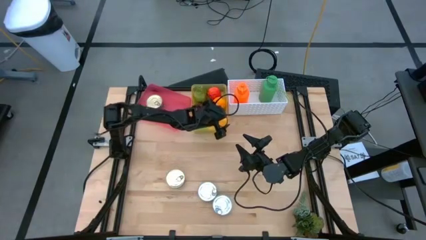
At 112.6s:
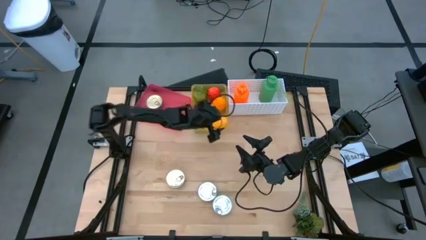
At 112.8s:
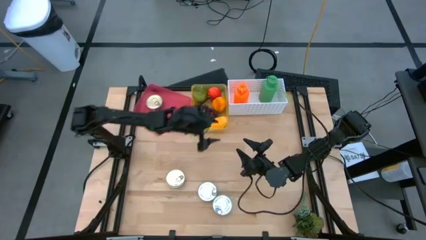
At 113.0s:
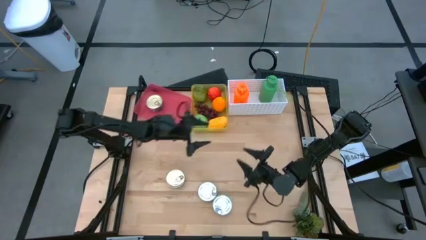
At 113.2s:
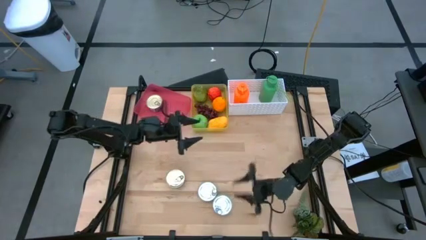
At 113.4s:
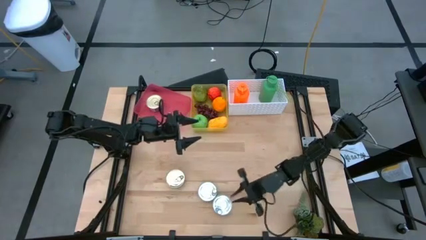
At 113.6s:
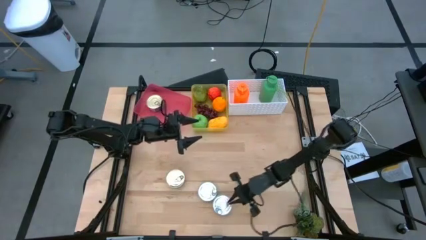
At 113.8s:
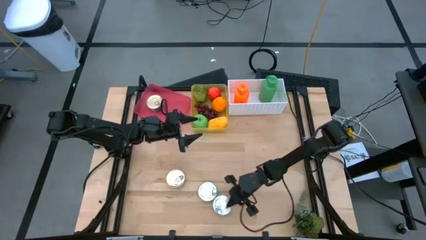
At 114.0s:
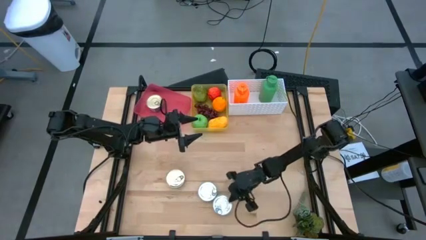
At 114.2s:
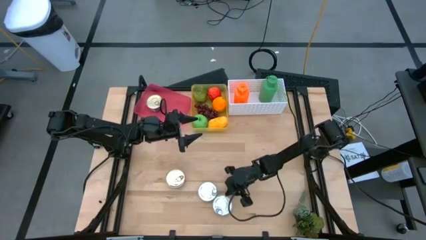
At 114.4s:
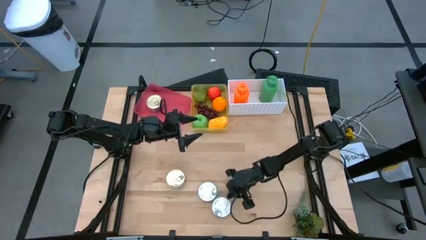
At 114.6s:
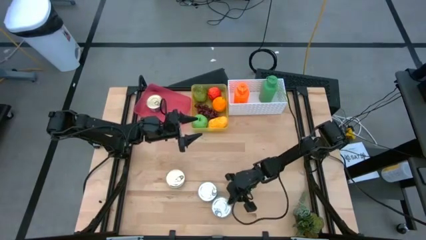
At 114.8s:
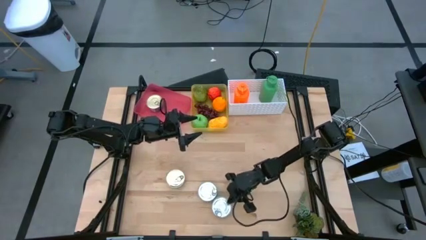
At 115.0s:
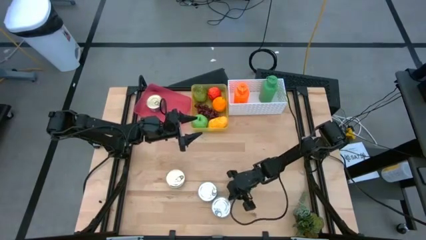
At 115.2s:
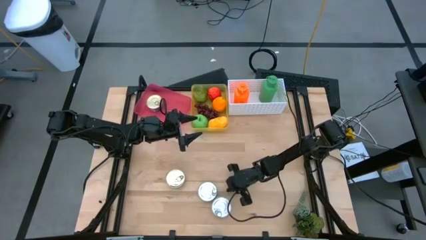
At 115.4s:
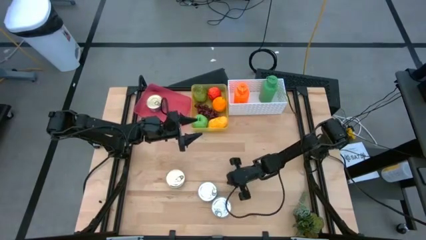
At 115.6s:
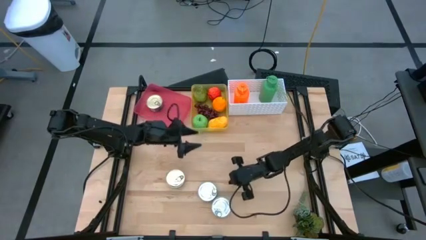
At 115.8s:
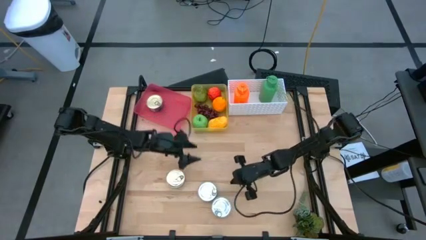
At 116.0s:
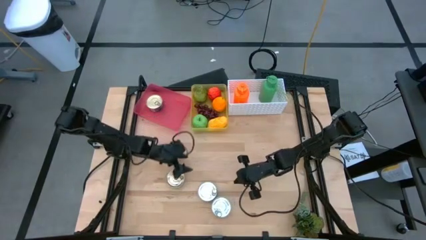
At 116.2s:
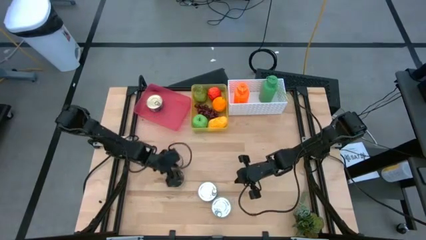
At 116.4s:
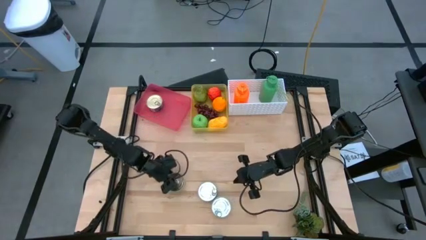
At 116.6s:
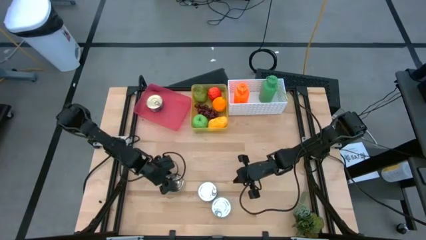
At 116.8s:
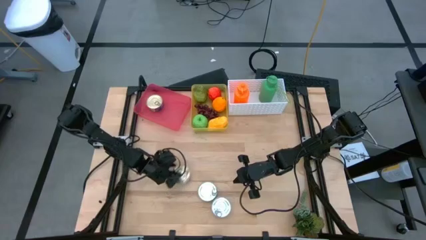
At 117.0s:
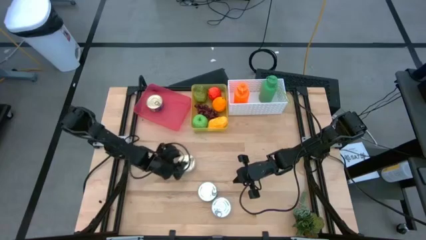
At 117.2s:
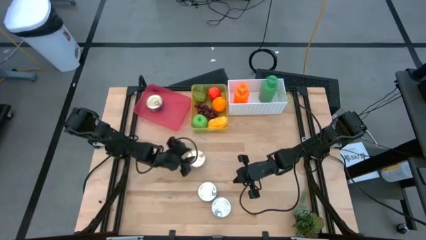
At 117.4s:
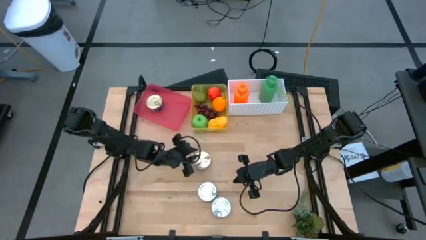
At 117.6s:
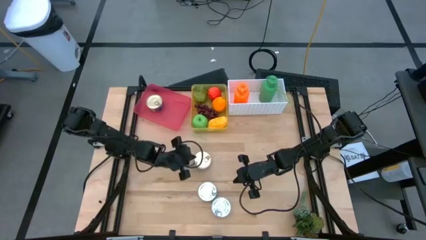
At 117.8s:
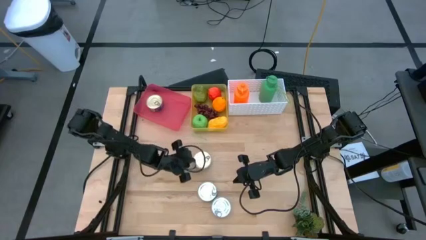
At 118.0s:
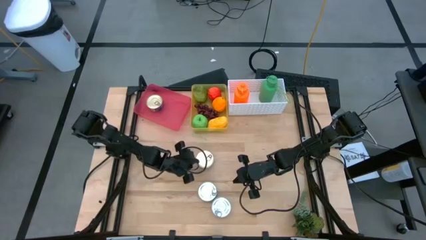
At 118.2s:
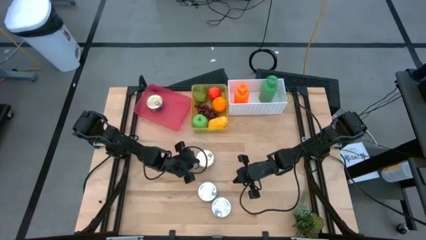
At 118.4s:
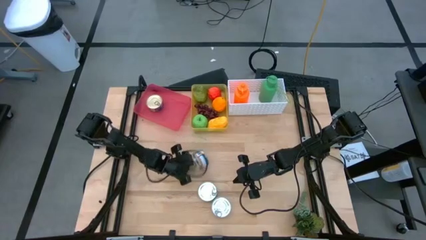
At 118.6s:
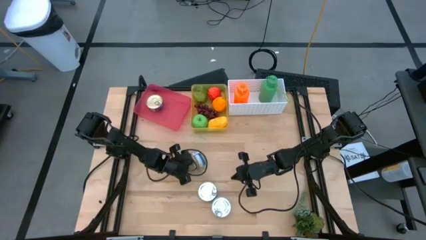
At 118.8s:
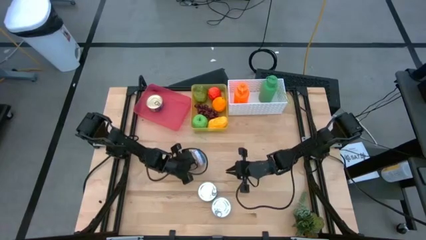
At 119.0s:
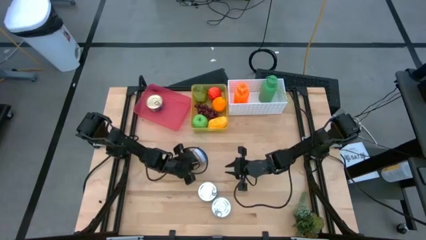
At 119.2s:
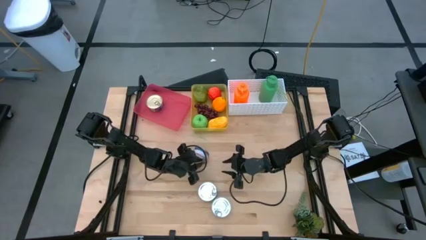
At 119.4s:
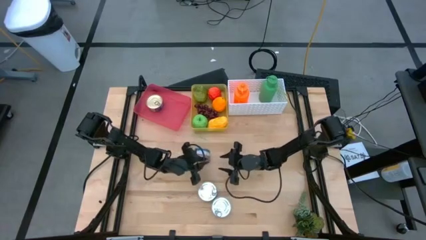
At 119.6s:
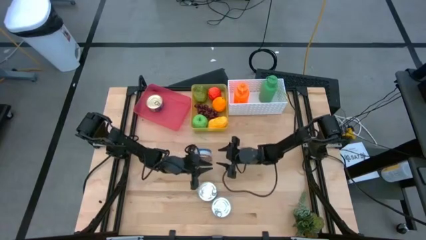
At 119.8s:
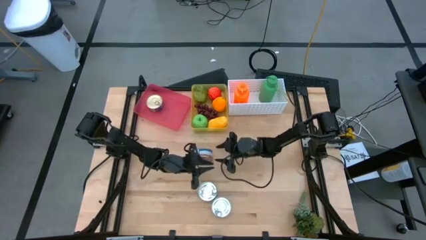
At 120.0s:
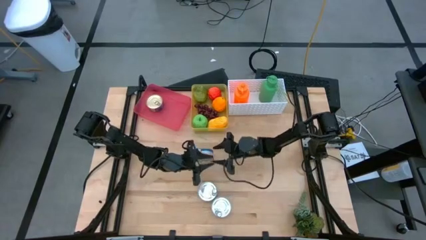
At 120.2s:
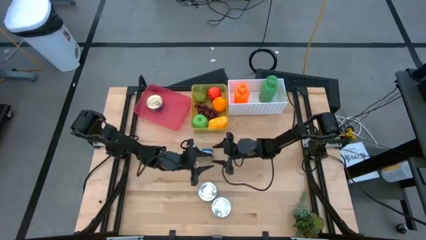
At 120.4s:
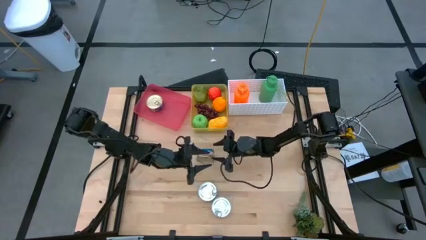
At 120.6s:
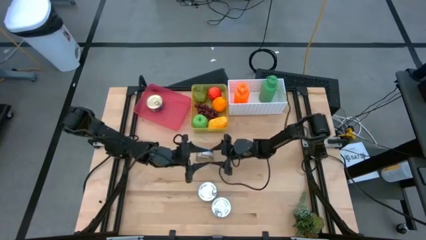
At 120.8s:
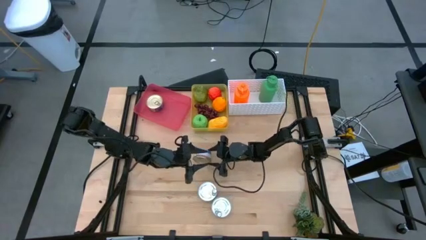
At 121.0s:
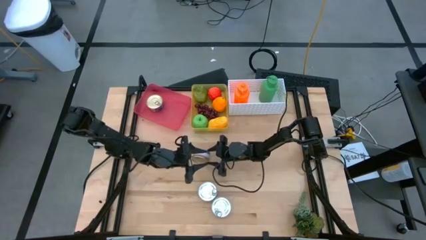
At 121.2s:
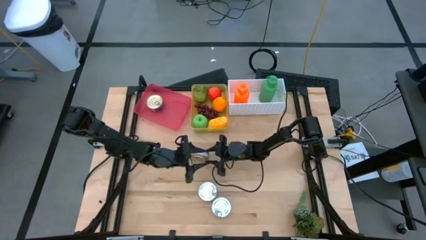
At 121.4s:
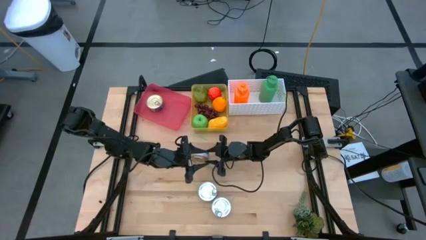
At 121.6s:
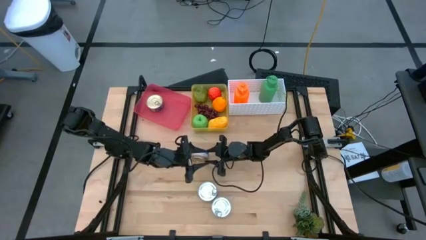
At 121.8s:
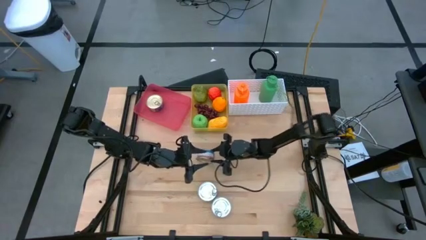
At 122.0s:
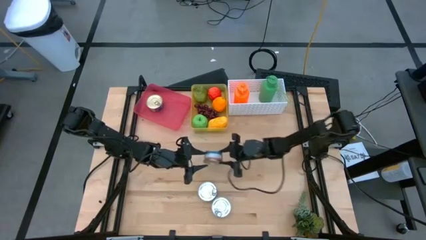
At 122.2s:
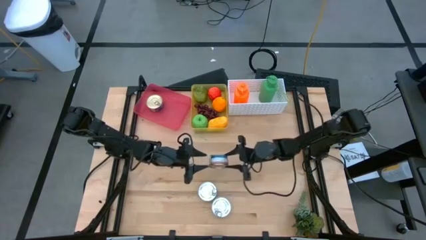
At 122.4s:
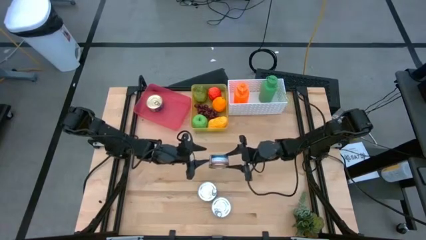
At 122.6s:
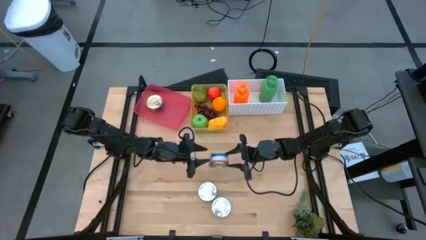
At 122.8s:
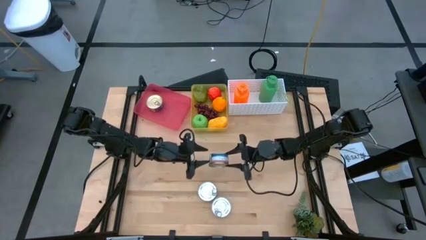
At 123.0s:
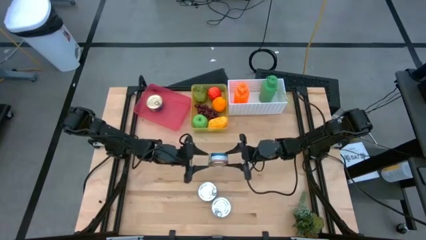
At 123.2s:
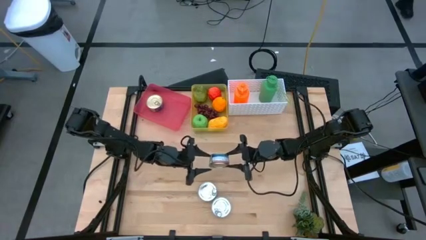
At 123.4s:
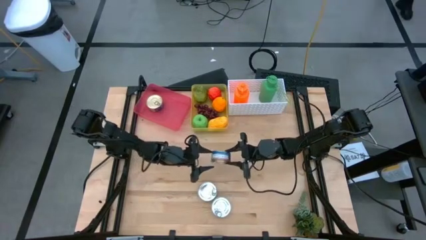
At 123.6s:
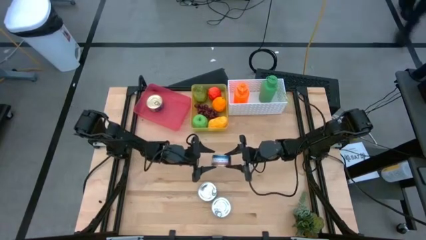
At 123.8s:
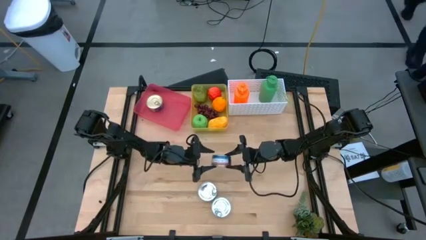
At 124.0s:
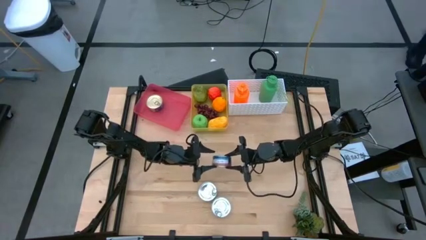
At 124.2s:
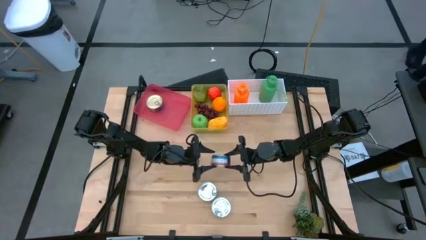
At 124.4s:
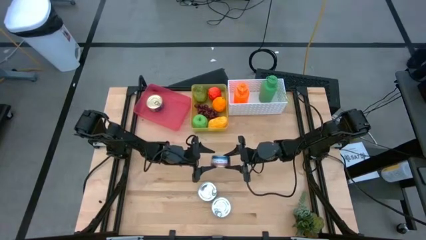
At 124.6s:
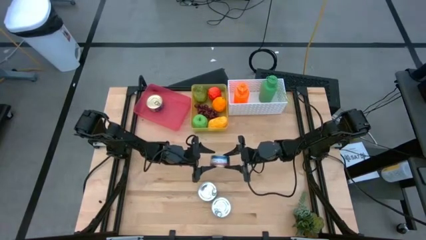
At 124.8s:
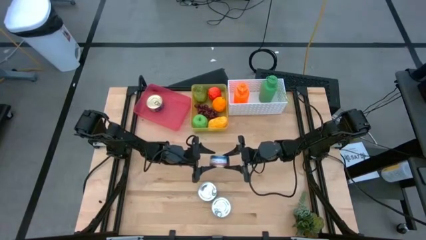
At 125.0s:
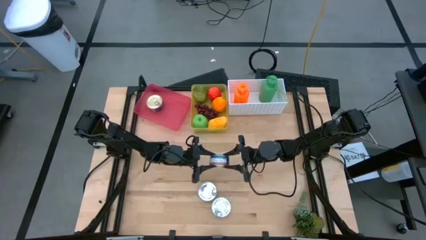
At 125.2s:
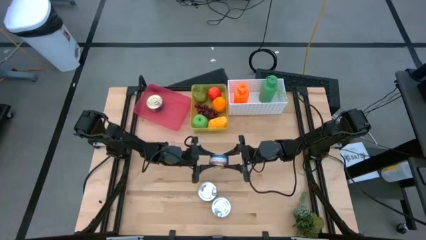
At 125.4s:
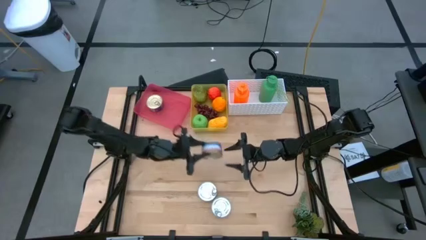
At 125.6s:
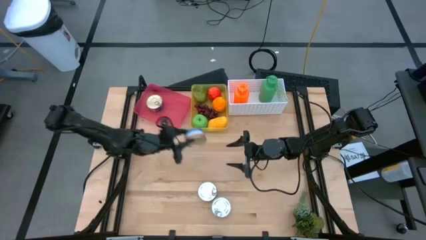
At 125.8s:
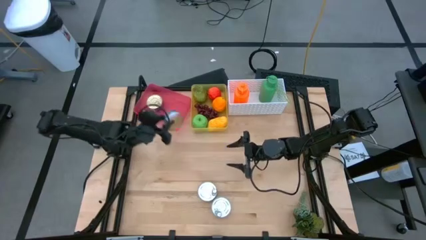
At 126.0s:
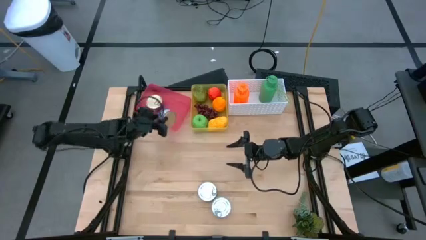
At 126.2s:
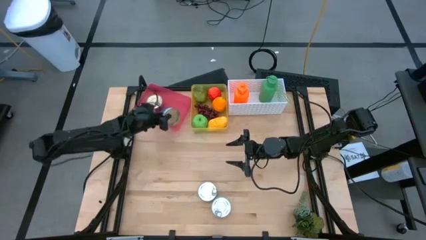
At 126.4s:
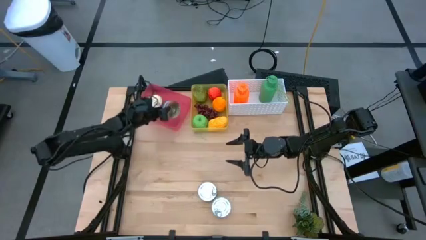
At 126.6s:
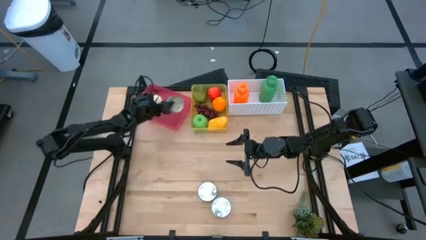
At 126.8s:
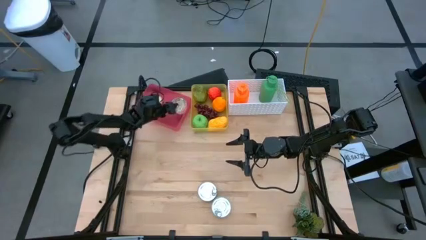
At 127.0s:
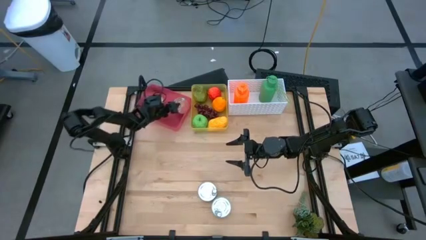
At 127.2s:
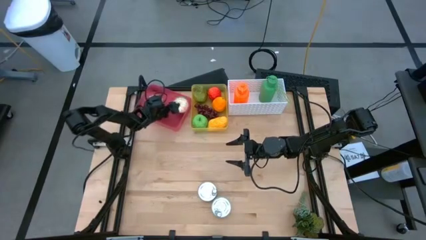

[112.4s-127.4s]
Task: Pick & Place Food Item
Put the blue and pink tuna can into the red bin

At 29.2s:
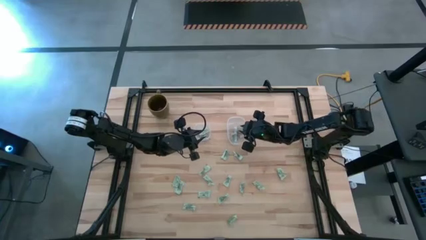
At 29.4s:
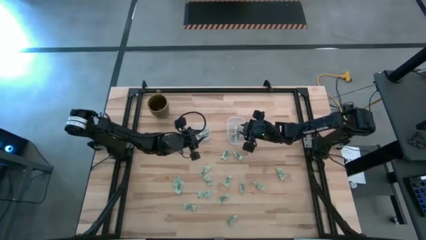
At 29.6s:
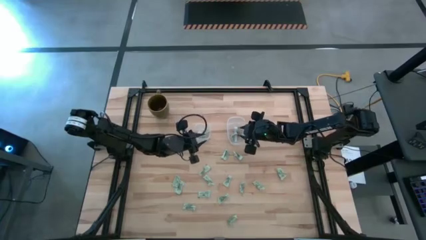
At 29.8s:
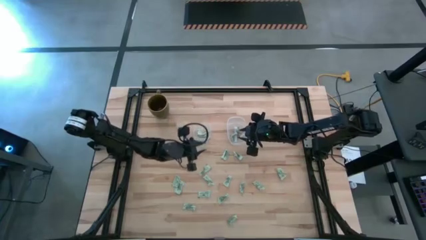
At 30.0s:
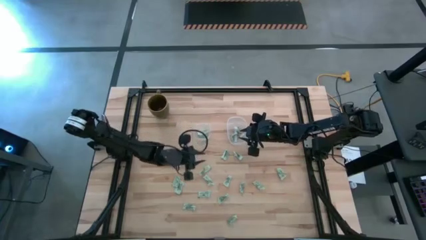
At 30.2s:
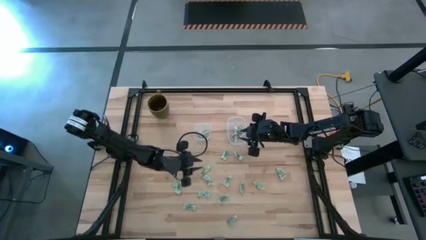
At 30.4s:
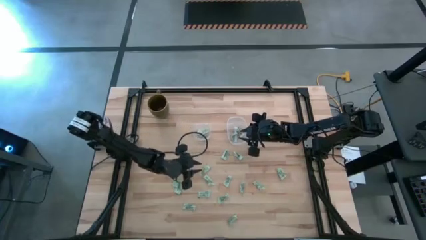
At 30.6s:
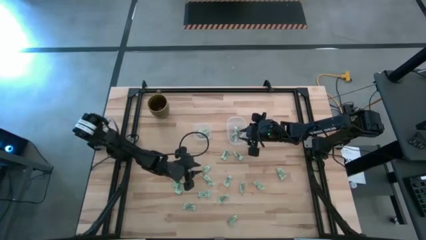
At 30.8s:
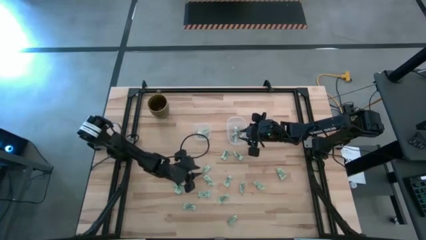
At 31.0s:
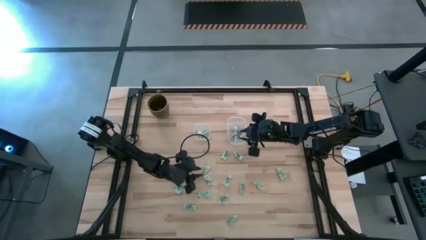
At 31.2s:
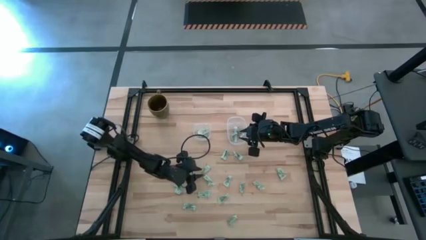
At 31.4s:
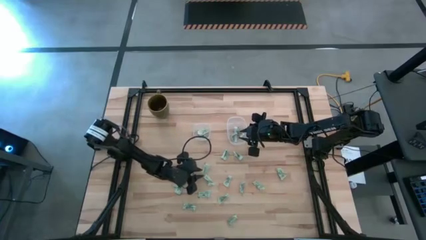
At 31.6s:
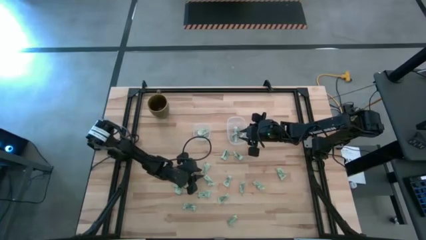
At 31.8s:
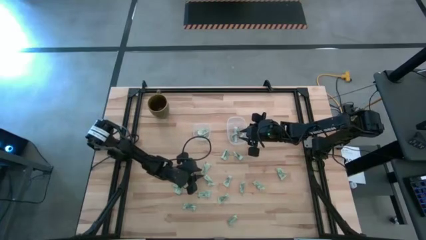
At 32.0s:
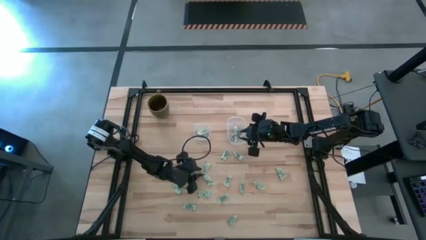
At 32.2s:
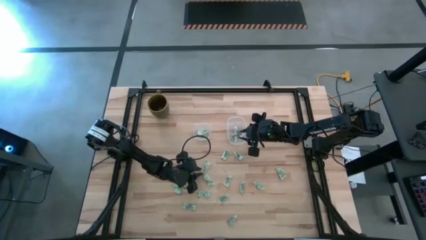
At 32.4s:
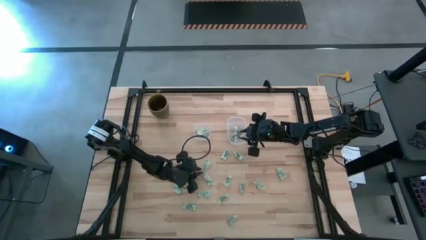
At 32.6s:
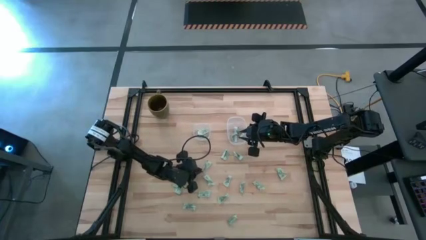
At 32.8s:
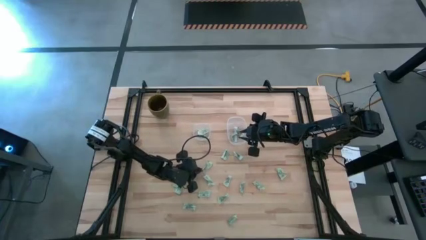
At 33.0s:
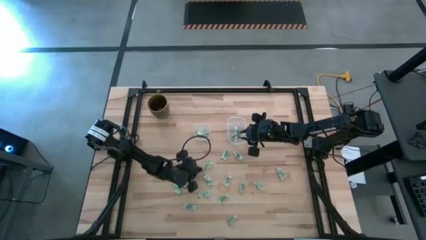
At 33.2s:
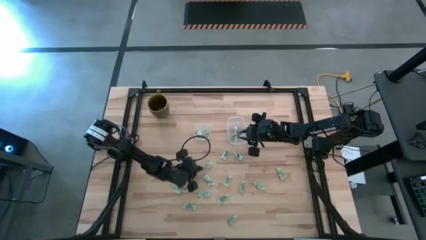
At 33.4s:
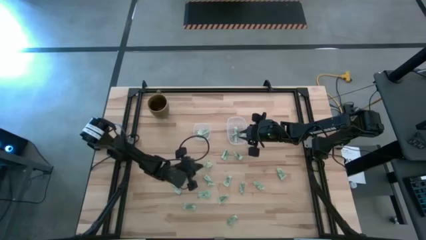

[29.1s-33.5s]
Task: Pick and place items into bin
Put the light green stevia packet into the left transparent bin
